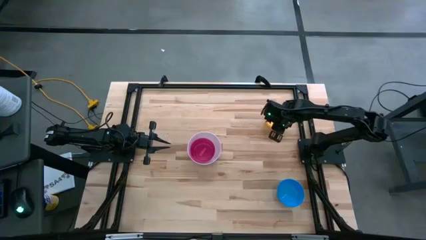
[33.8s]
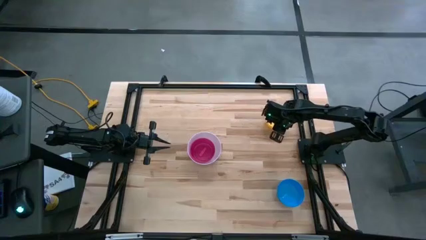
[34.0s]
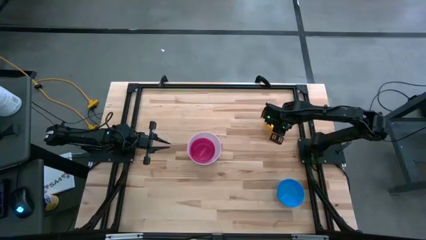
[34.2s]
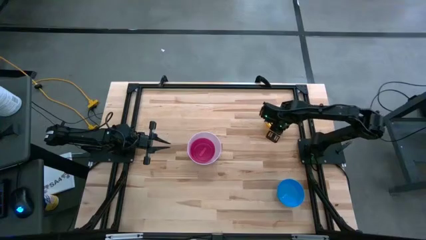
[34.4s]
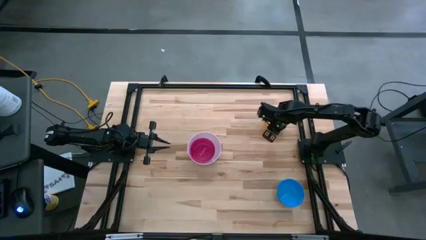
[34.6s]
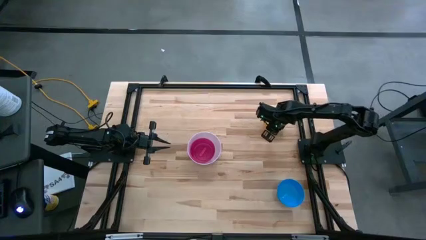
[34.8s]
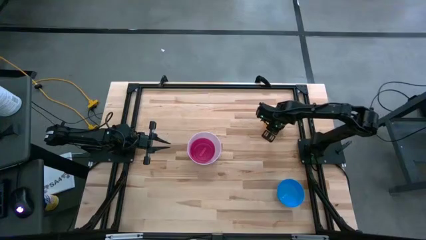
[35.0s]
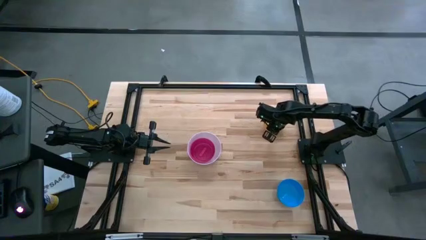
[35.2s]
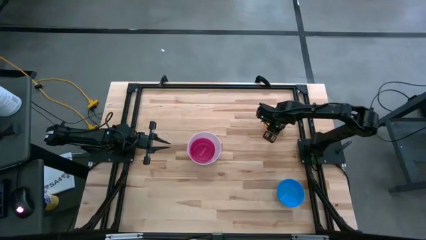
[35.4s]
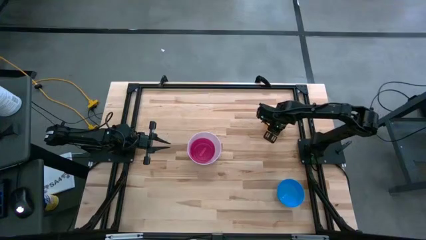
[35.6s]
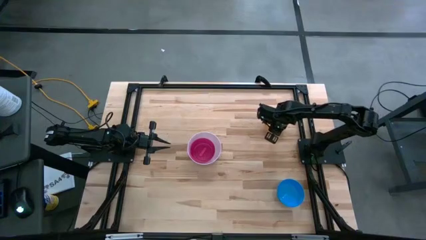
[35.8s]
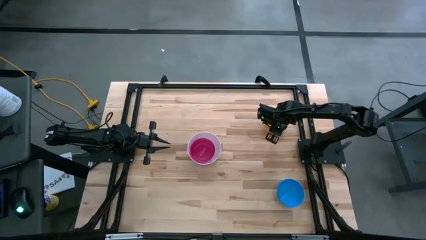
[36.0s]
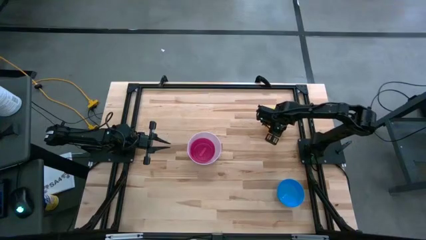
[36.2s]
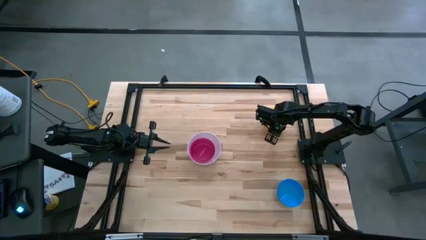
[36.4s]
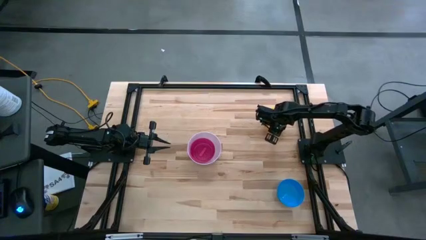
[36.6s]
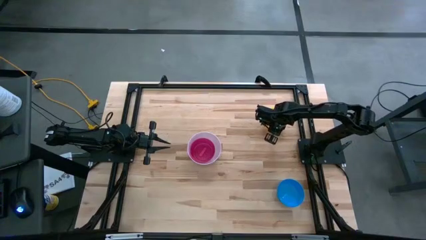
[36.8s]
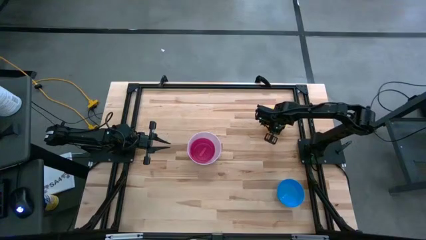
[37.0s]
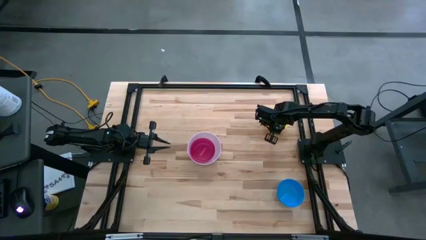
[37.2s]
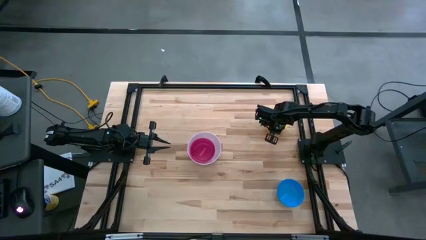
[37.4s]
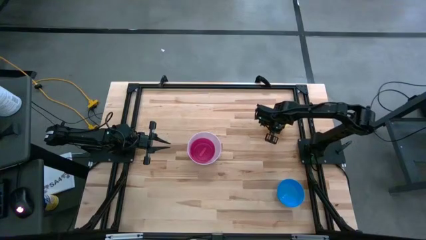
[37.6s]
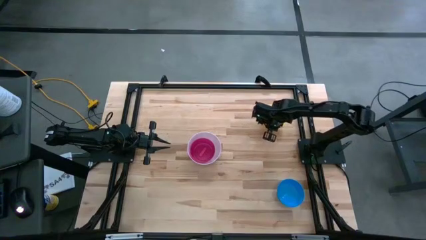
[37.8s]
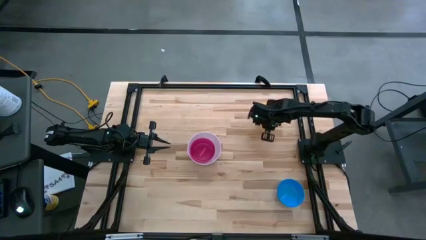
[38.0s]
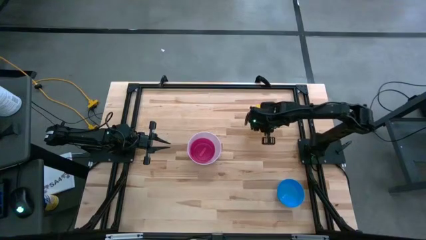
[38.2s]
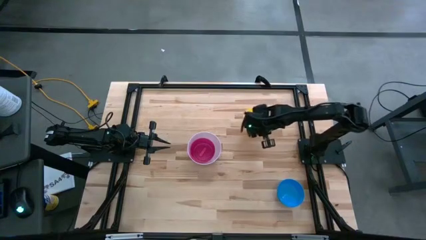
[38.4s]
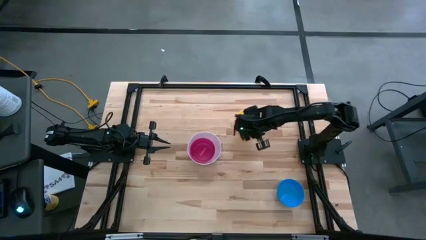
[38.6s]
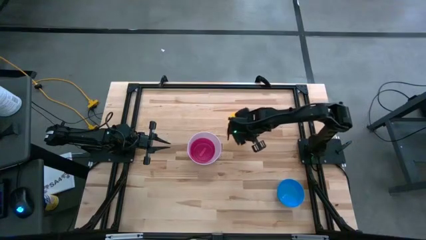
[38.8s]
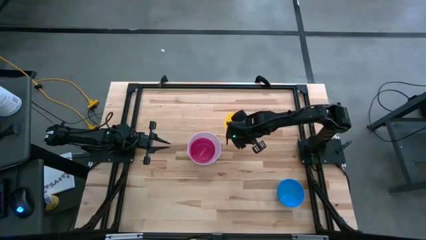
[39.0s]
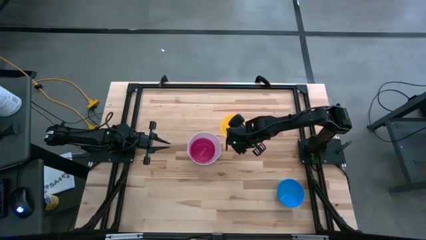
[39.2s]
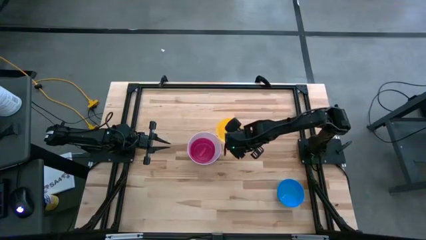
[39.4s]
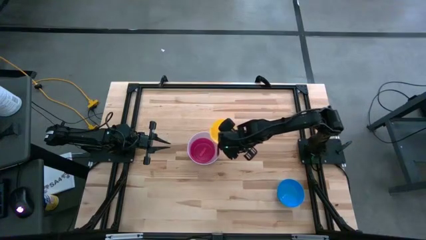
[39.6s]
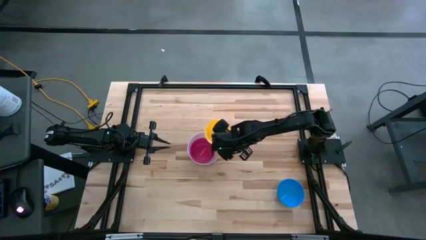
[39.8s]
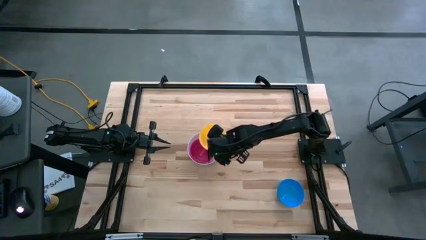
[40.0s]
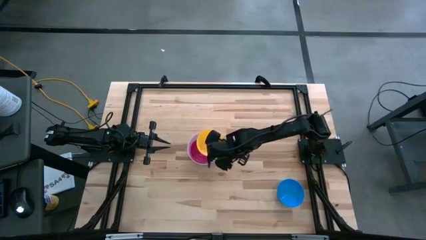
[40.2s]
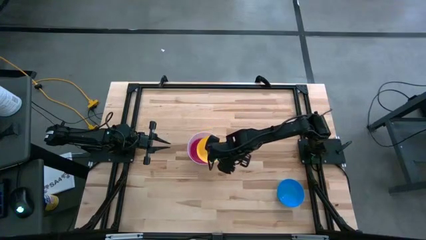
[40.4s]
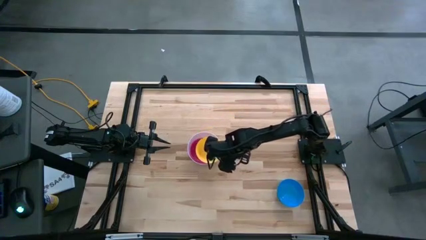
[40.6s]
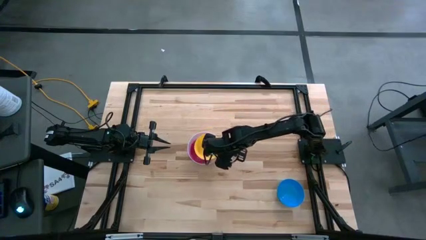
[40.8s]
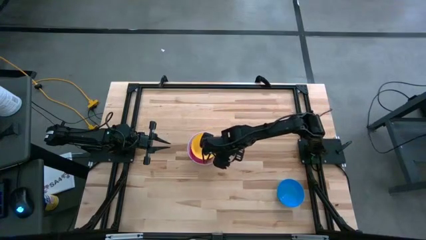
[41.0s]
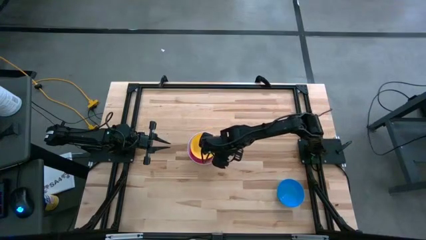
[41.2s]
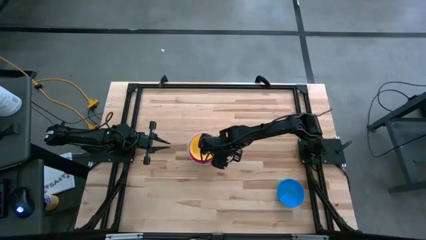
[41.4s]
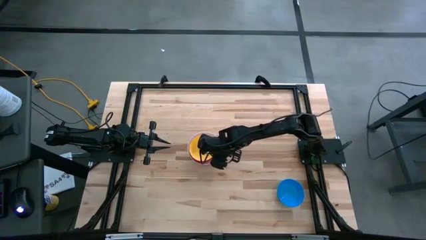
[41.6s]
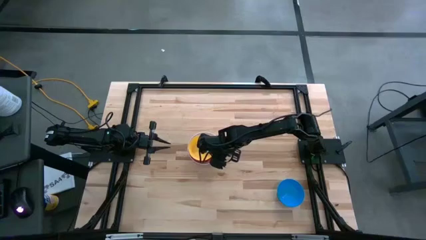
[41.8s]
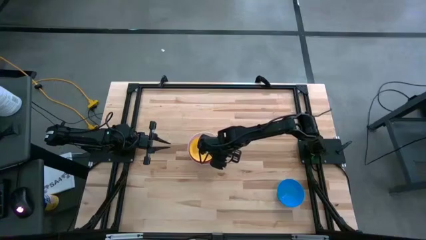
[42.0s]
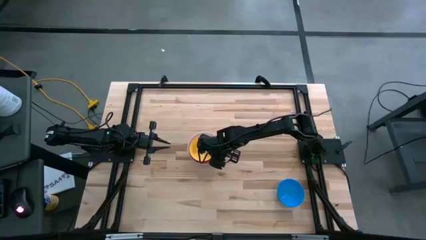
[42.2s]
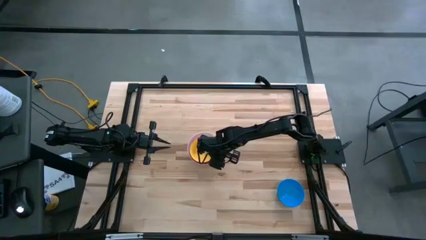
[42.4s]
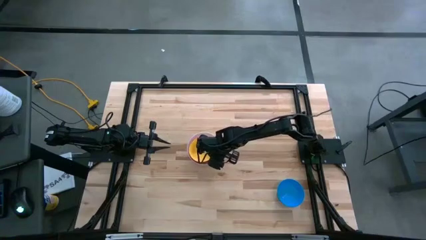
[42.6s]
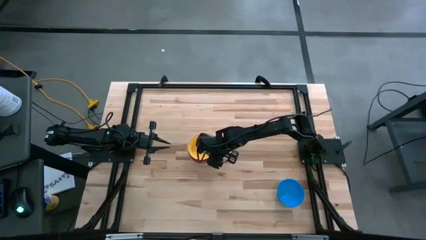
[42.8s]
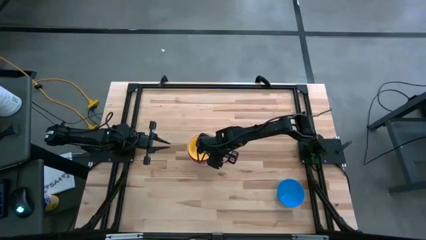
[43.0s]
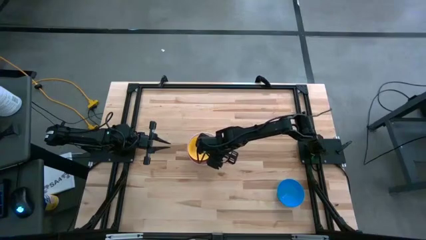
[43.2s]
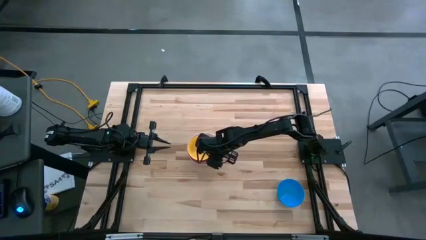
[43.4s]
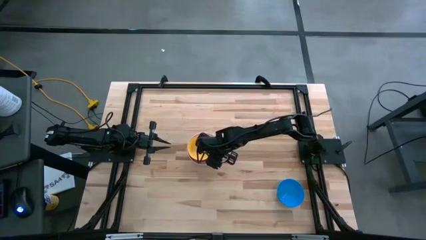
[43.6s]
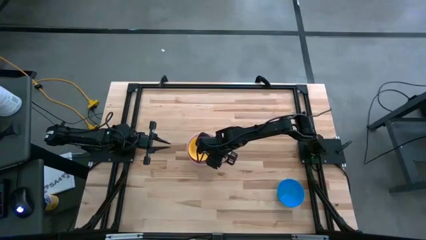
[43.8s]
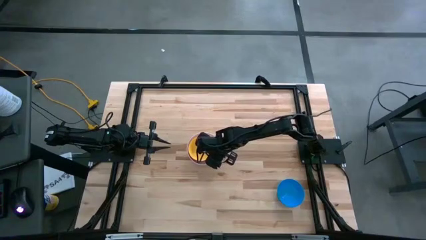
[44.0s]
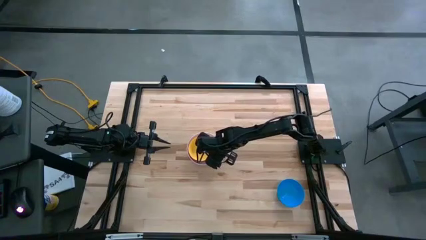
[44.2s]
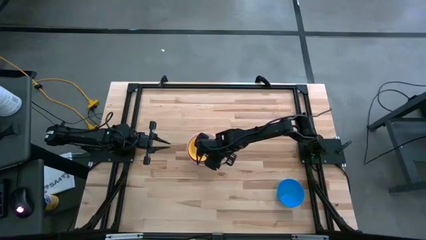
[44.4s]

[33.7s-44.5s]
Stack the yellow bowl on the red bowl

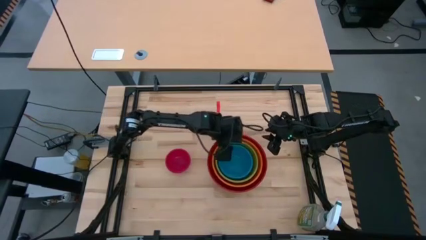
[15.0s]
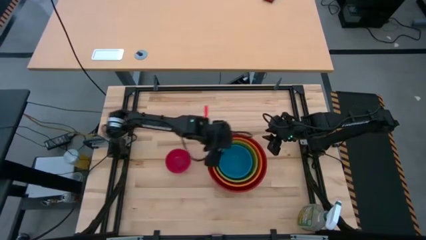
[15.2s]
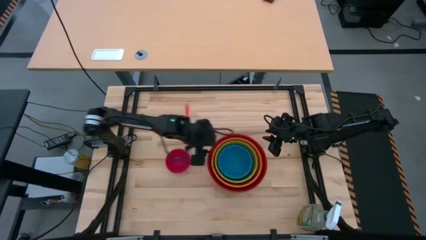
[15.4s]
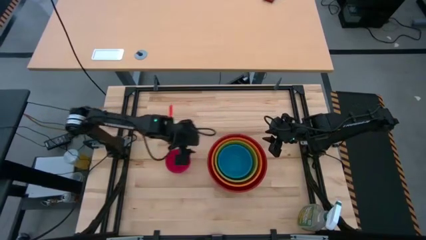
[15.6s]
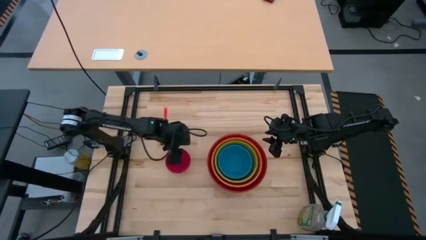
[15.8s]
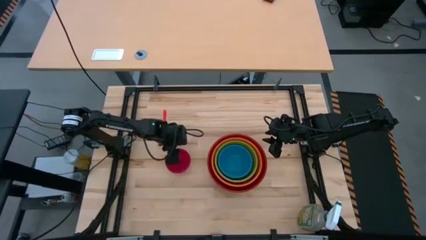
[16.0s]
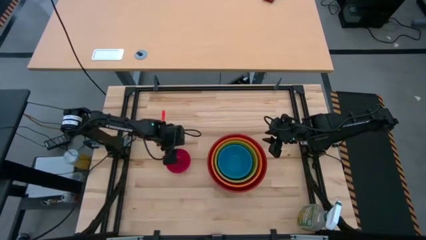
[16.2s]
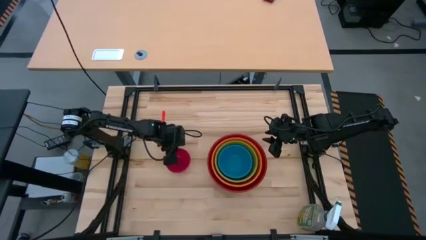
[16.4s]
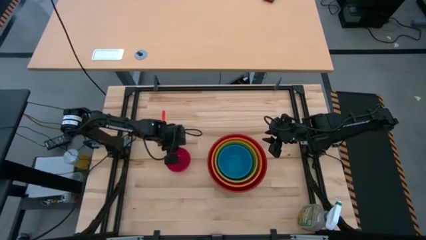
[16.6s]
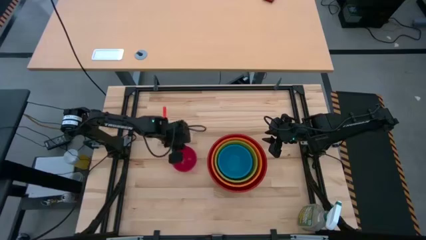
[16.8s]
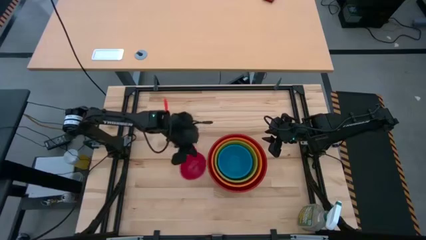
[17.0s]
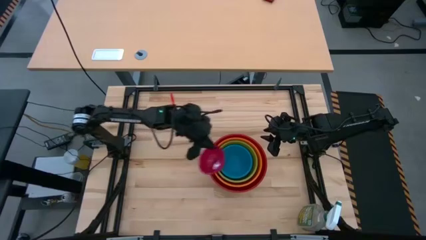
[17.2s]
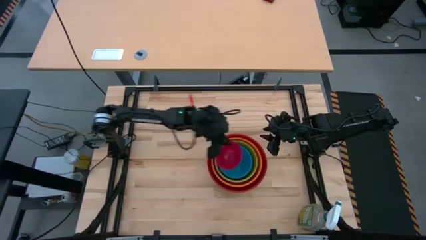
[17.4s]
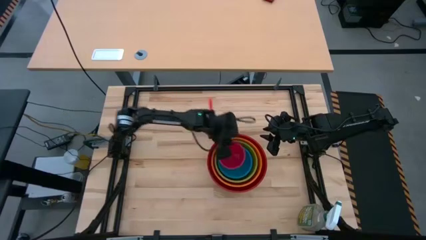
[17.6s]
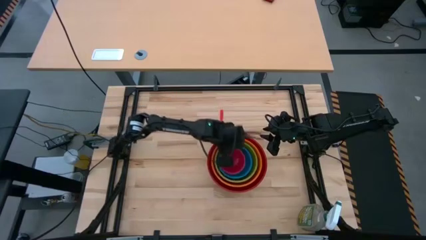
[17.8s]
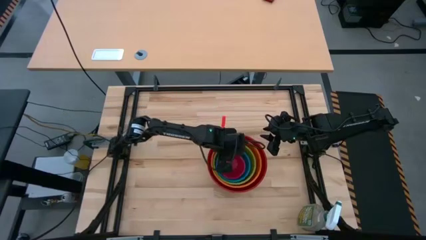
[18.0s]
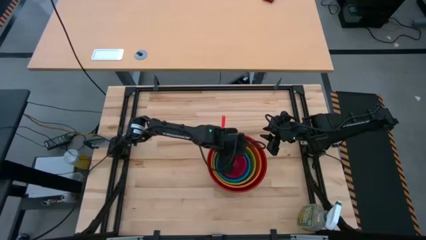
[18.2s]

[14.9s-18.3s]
Stack the small red bowl on top of the blue bowl
